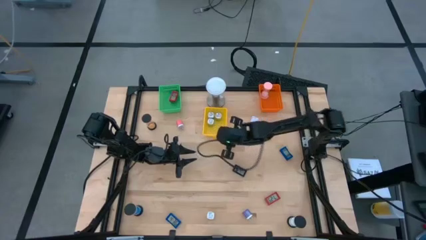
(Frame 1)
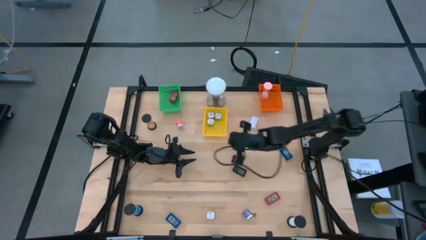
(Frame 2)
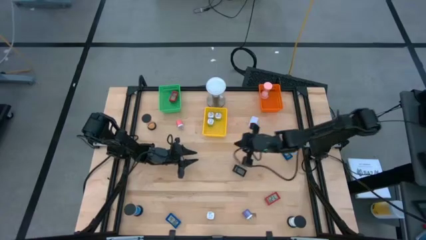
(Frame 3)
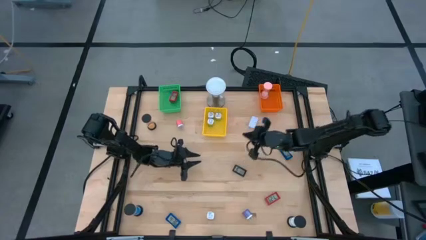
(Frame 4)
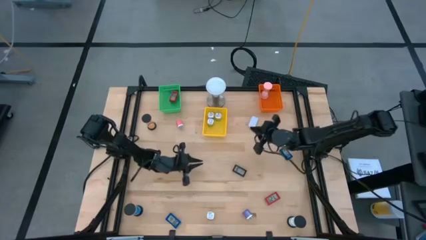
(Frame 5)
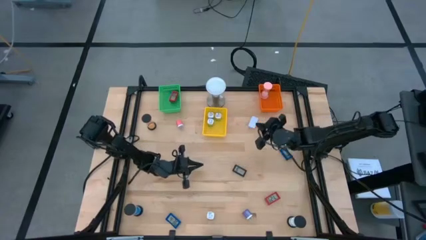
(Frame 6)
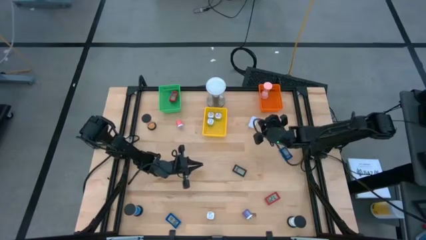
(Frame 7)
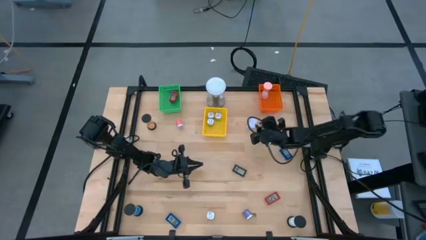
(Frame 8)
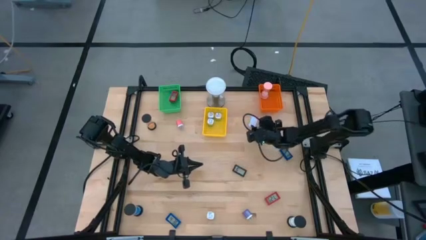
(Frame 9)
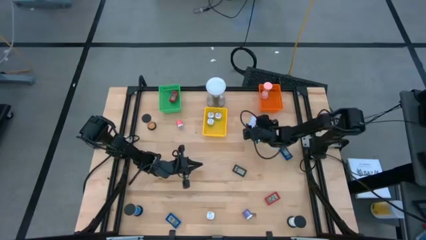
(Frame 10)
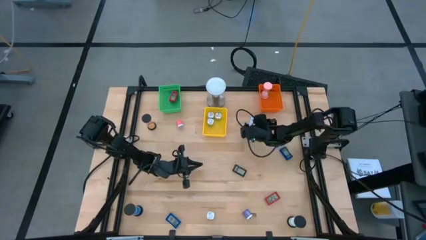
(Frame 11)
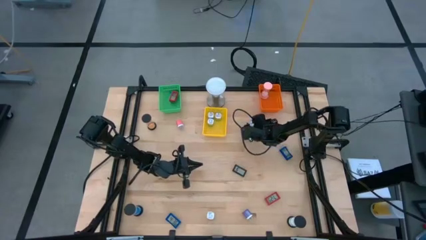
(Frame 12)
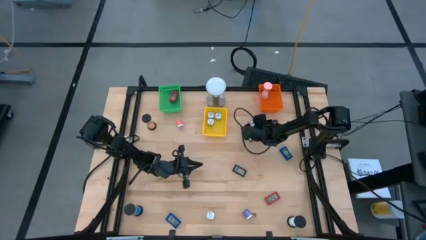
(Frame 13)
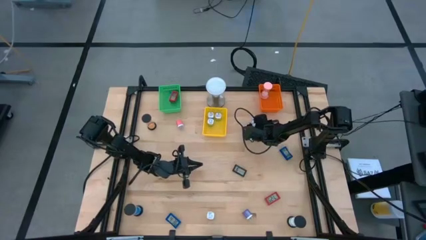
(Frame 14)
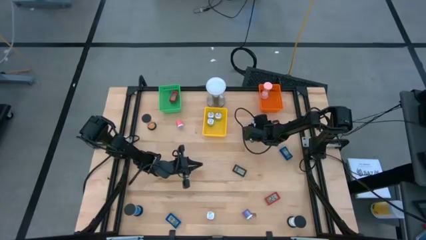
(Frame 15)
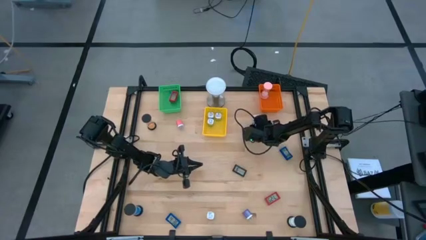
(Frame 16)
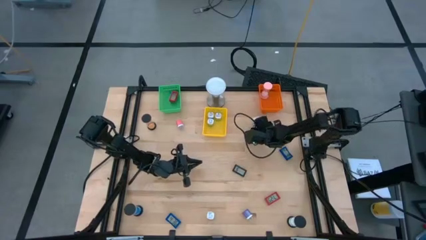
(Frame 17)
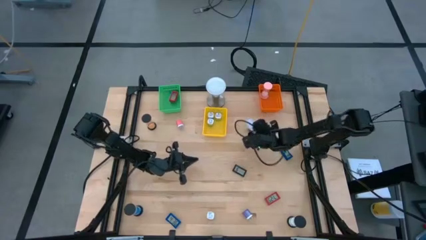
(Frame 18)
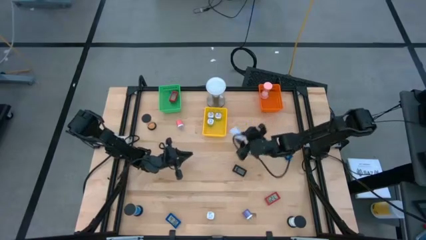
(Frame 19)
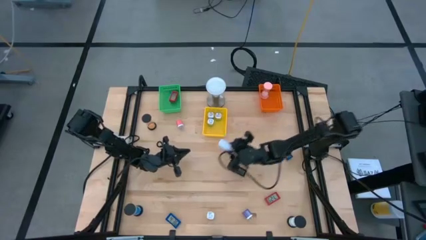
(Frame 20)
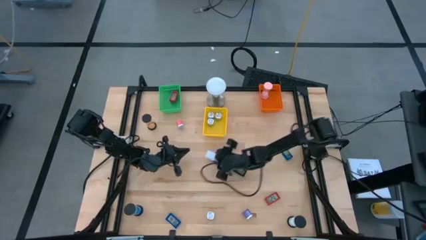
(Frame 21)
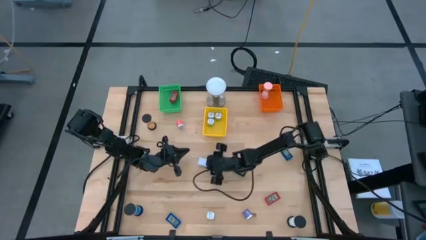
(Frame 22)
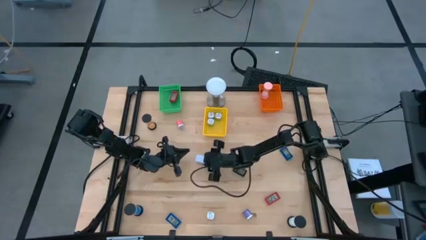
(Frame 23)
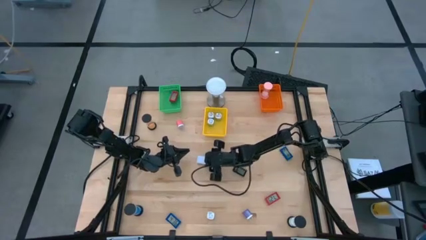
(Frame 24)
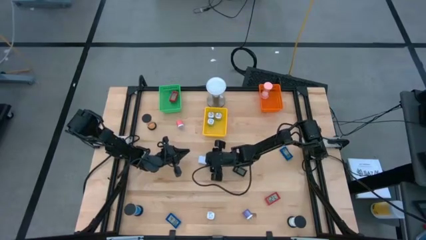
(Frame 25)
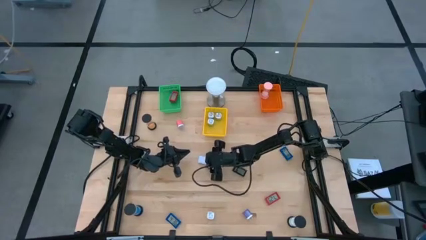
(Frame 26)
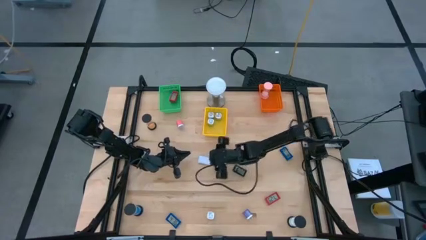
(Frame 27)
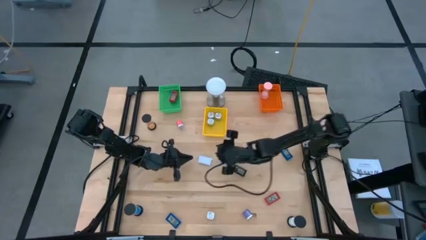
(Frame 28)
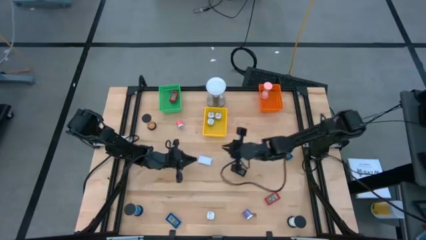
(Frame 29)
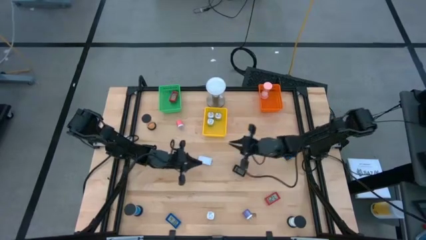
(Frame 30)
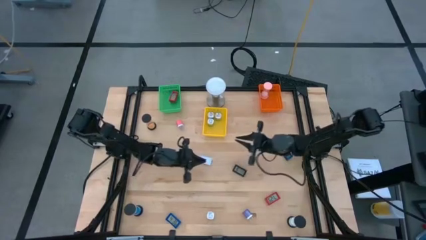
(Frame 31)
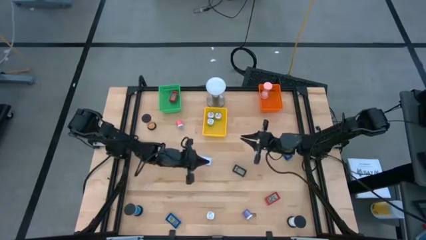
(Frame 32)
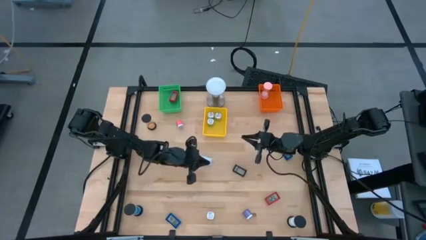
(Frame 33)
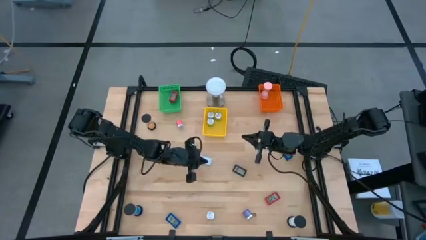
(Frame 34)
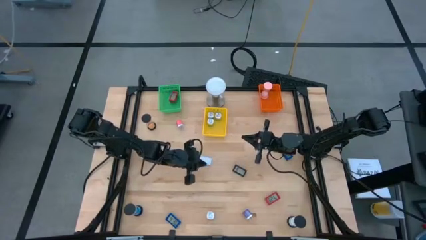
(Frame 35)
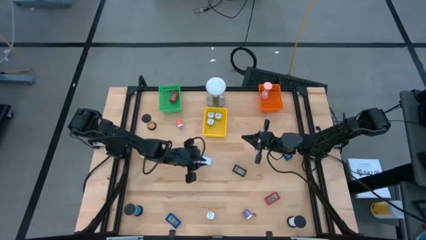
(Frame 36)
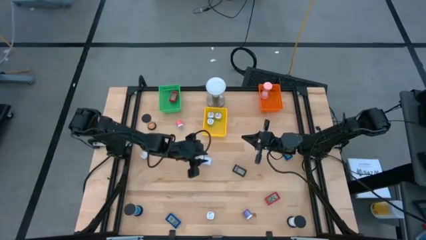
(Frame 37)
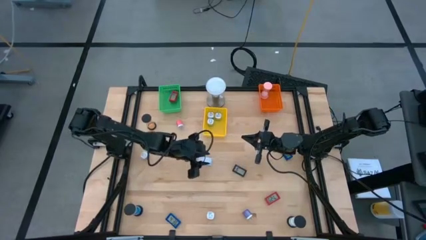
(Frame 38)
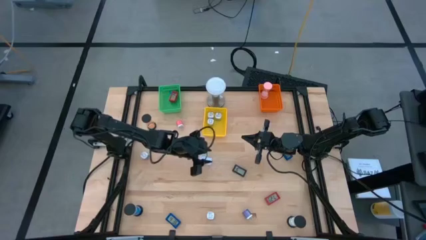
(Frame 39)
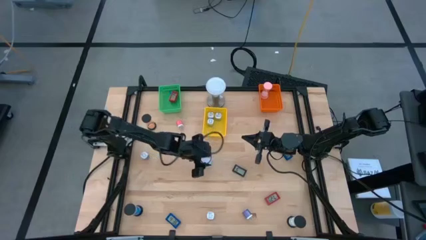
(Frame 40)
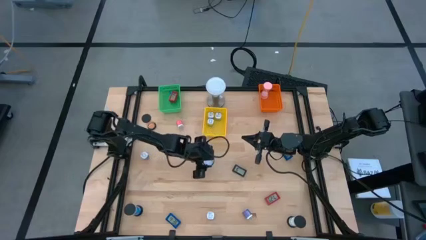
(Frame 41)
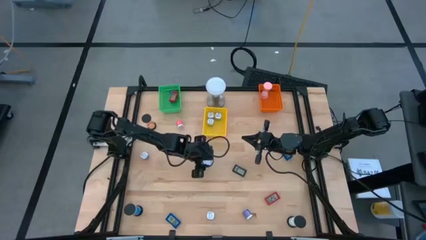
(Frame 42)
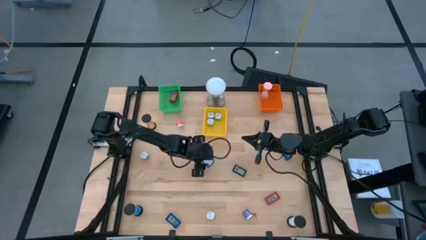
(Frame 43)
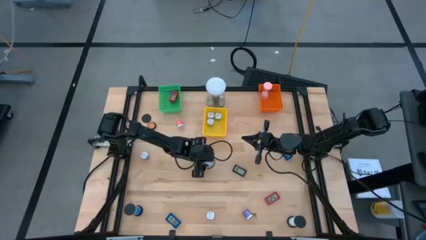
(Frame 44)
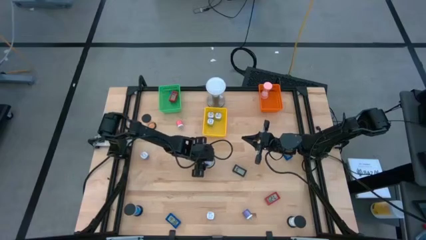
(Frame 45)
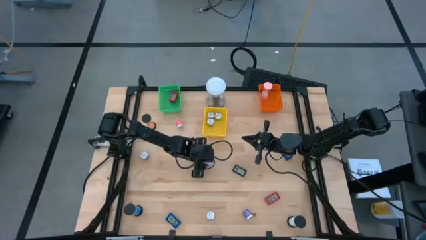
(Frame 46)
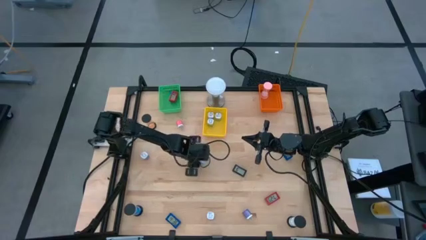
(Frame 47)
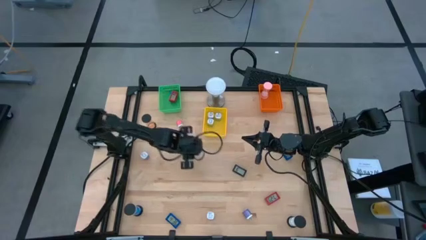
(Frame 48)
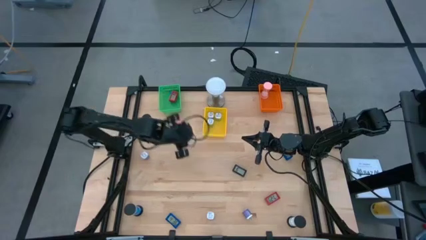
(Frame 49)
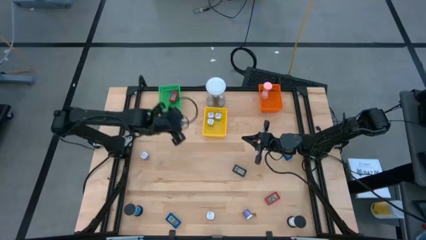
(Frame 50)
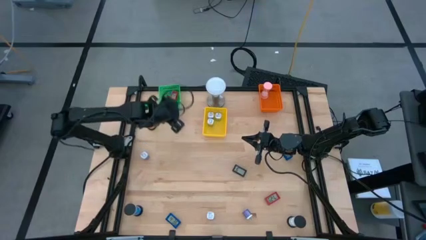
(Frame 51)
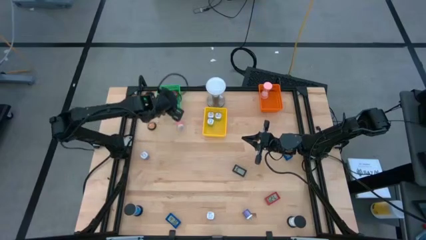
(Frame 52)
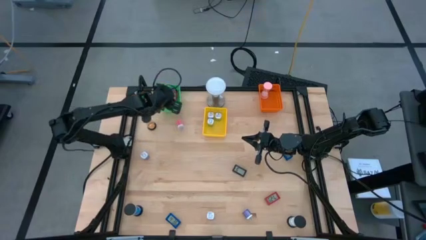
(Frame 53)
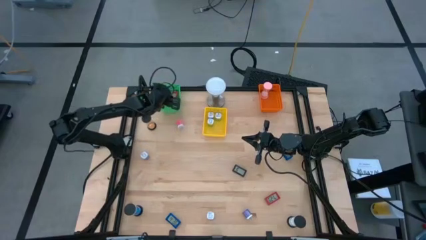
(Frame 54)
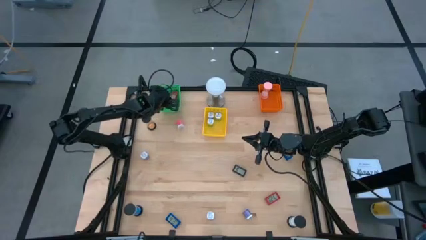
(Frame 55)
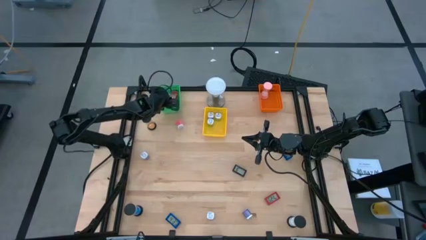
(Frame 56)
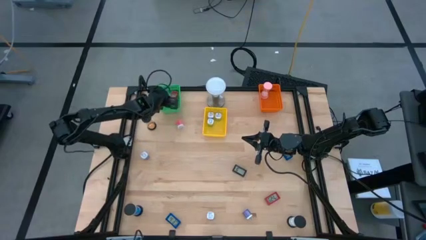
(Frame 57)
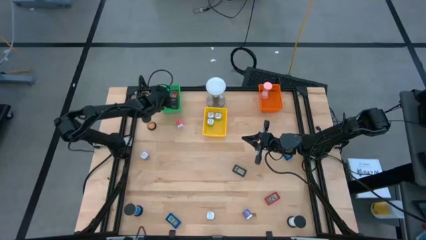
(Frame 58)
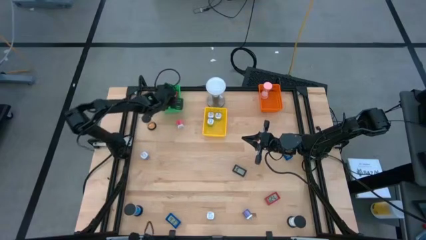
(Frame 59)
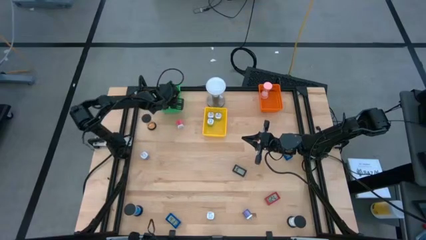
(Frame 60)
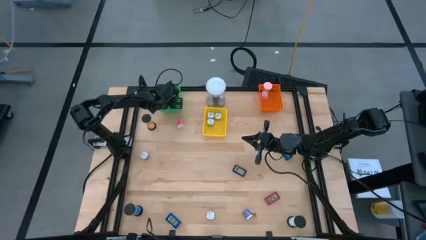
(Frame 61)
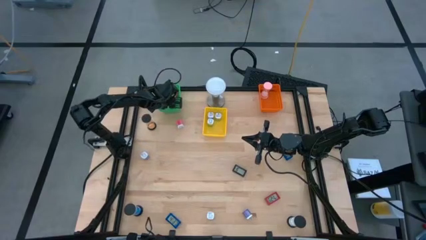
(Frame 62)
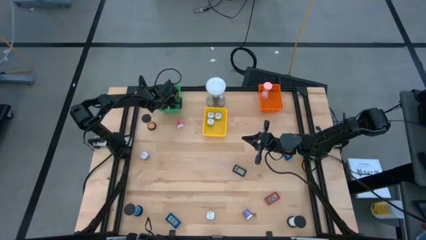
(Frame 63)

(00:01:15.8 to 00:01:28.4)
Task: Pick & Place Office items
Put the white digital clock into the green bin
